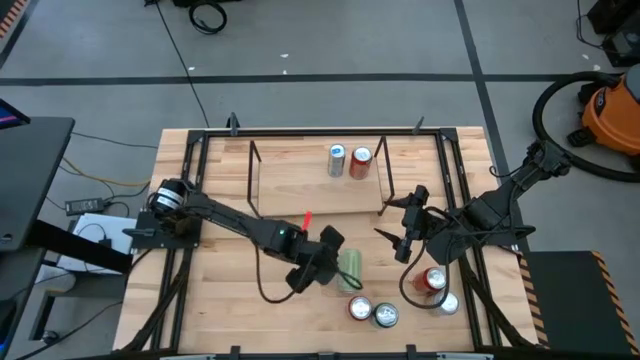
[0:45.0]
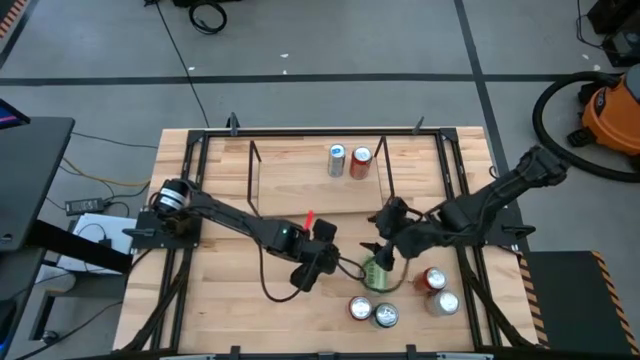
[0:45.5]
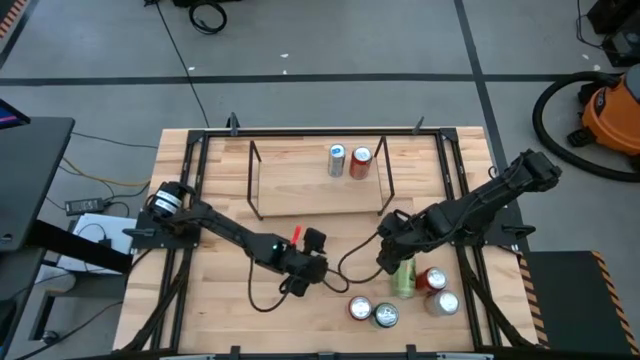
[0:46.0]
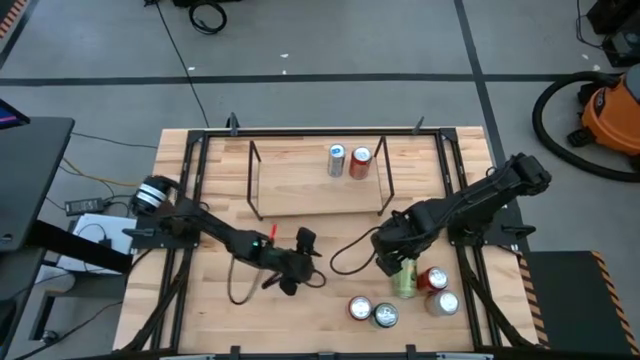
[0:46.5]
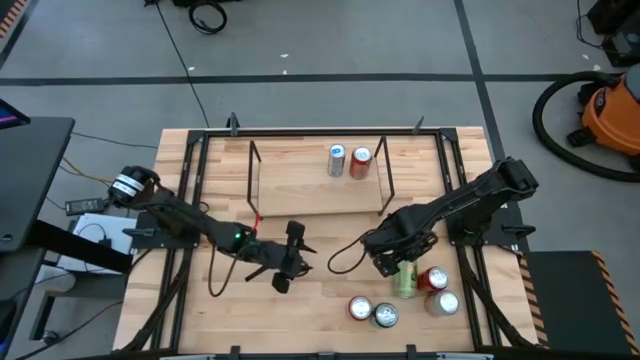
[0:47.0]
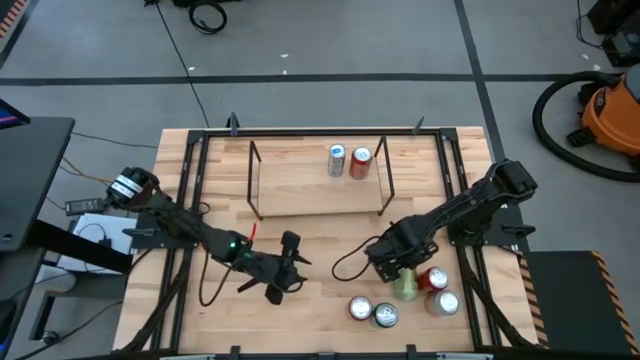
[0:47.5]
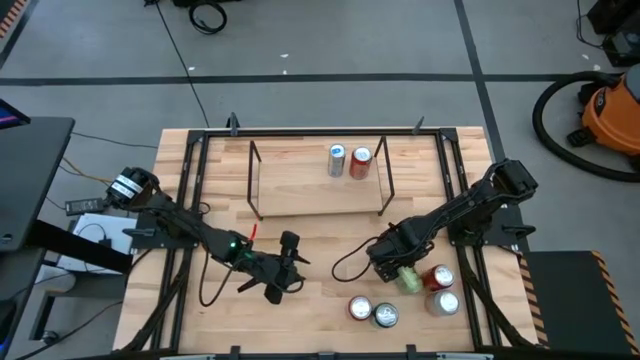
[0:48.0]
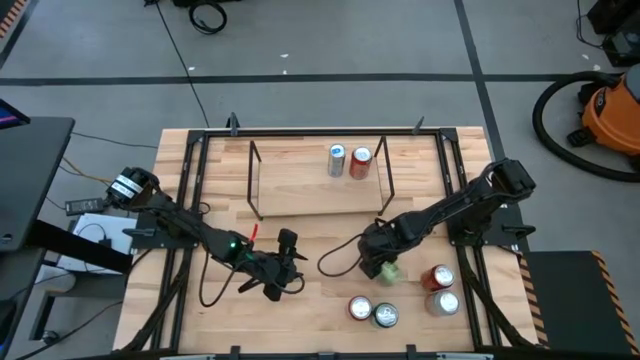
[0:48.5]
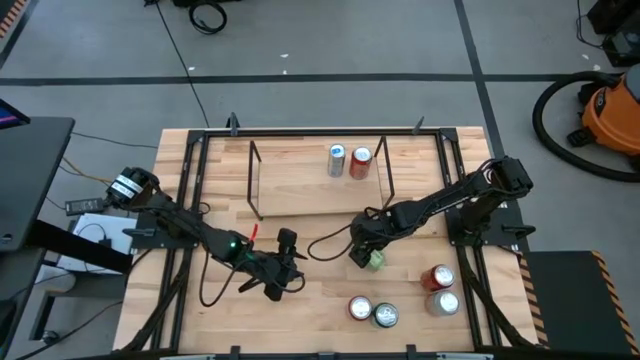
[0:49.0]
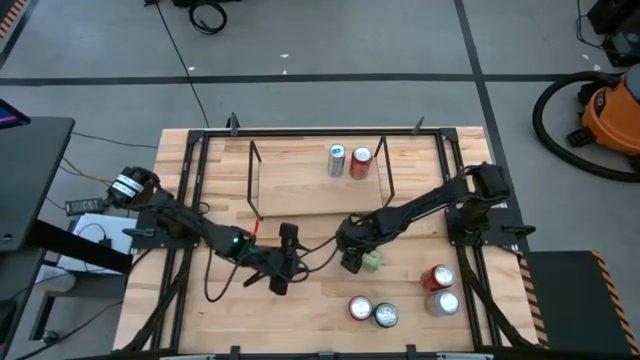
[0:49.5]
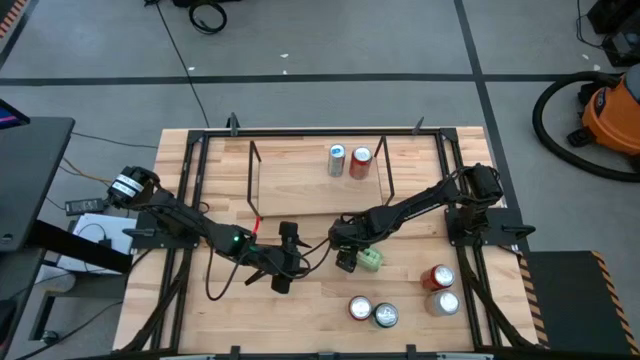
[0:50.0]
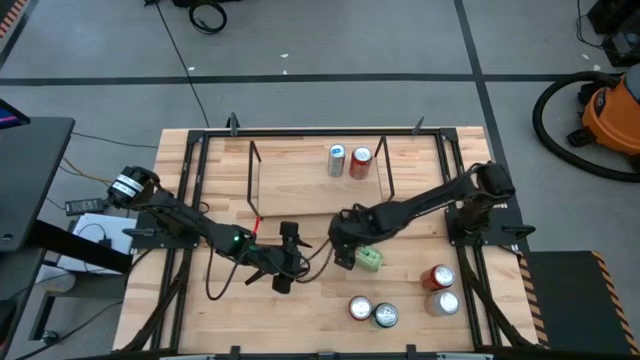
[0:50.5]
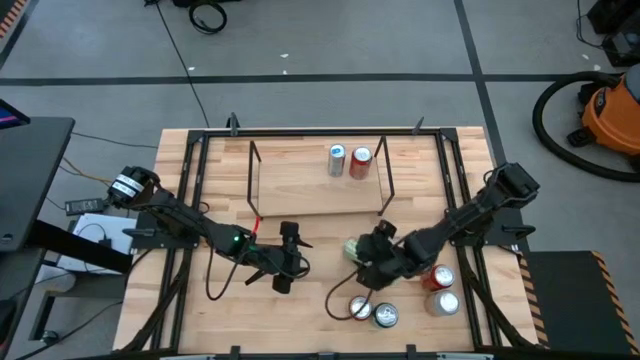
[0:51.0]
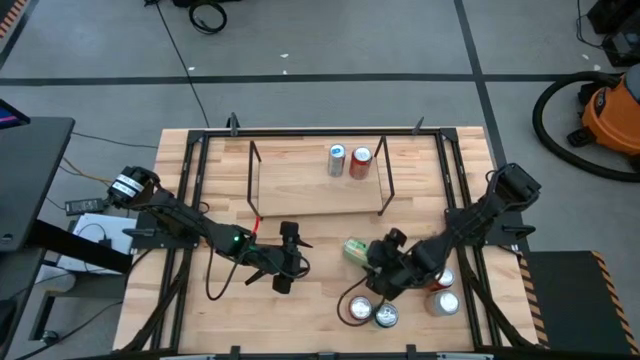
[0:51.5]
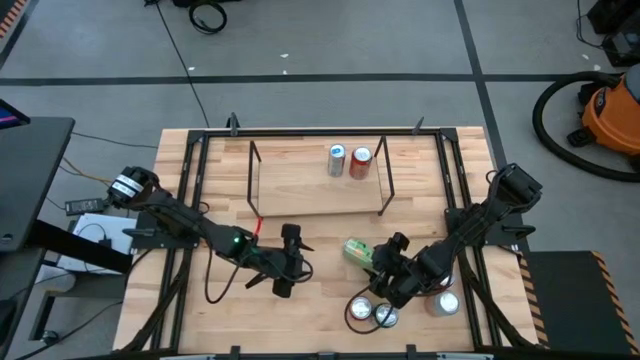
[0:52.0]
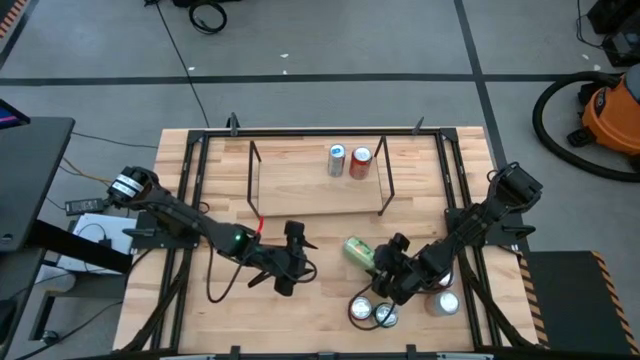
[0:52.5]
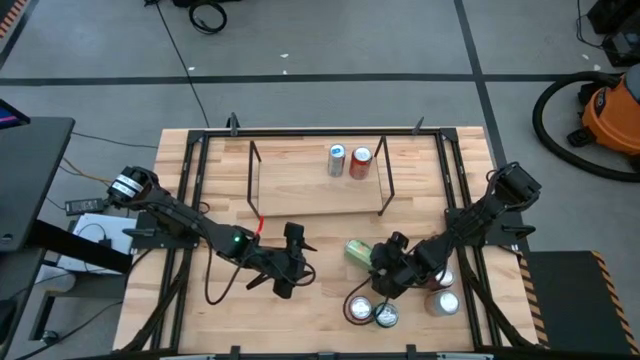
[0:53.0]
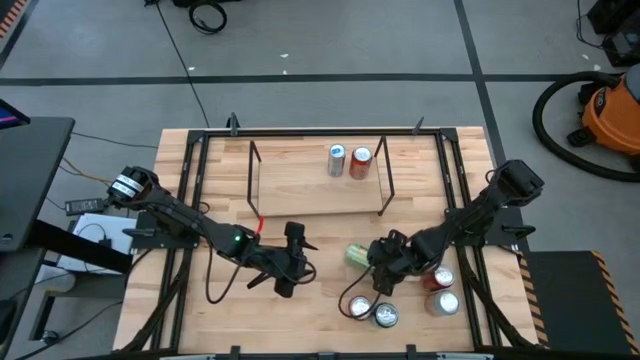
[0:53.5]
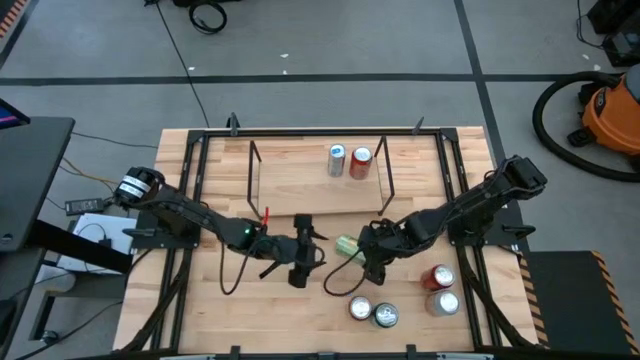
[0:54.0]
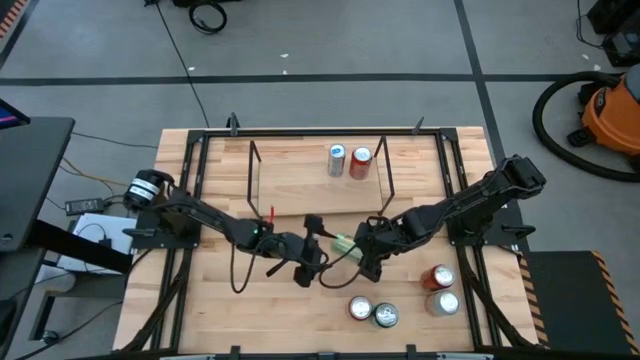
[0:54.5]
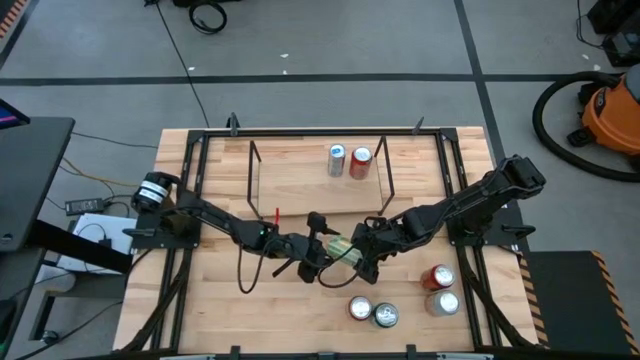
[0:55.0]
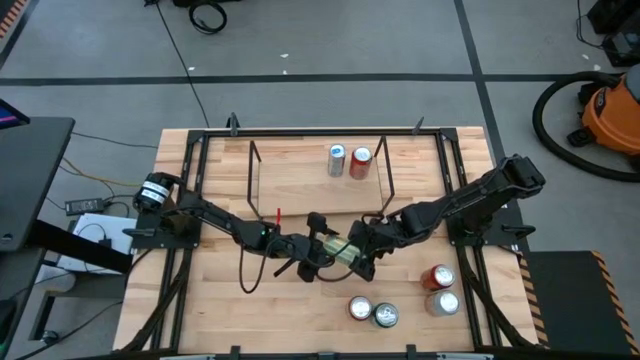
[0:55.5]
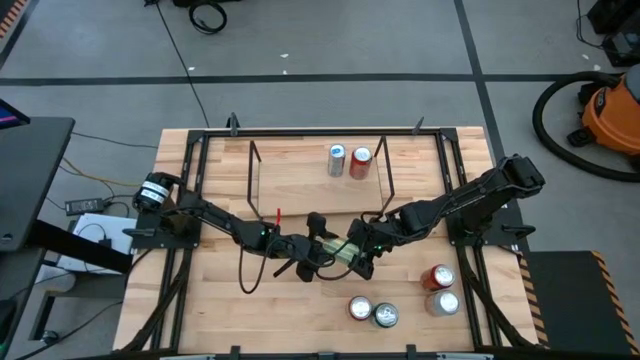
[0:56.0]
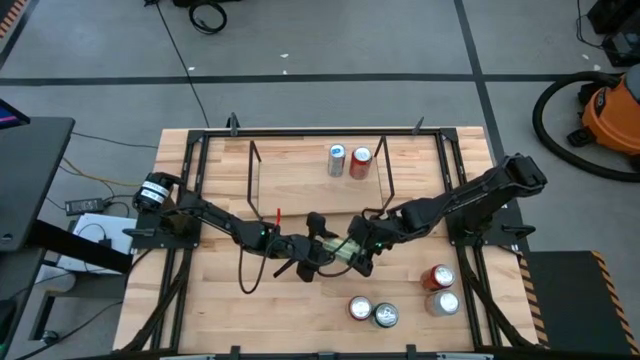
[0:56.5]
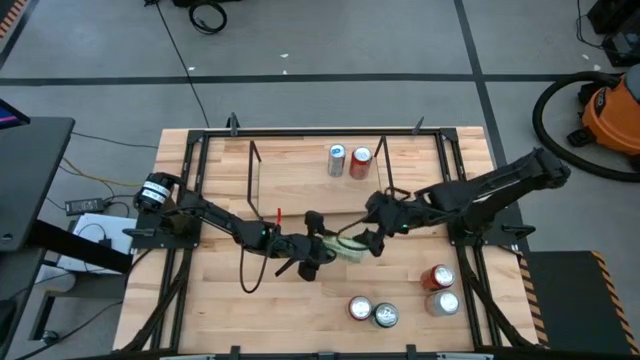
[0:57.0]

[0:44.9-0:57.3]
Task: Place canned beverage on shelf
Put the light green soda can on the shelf
